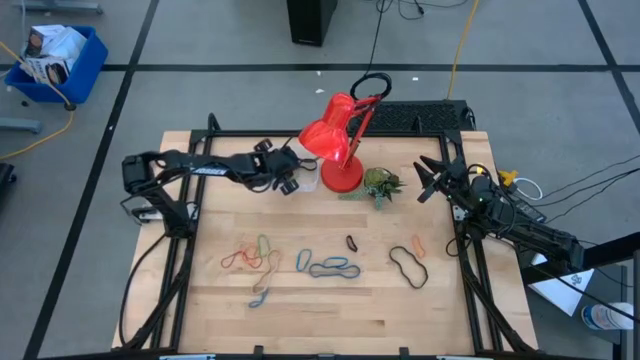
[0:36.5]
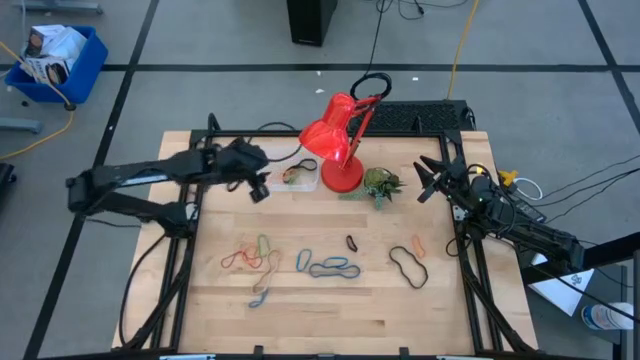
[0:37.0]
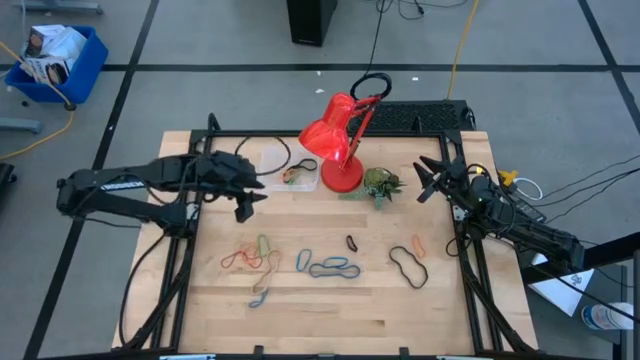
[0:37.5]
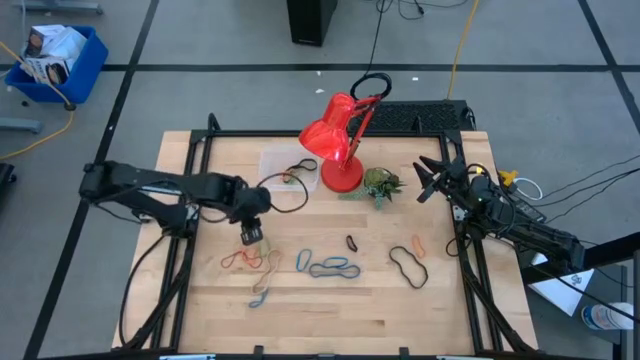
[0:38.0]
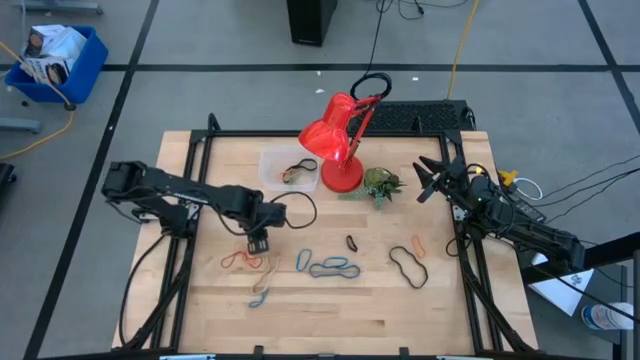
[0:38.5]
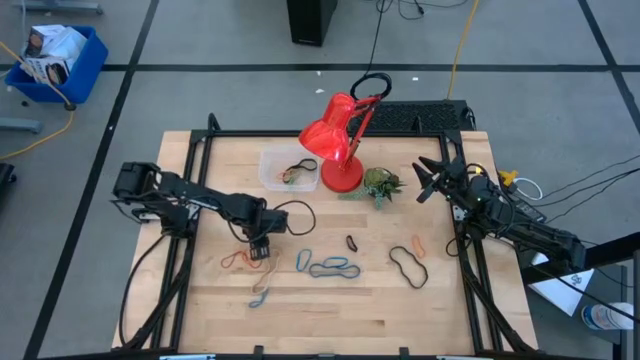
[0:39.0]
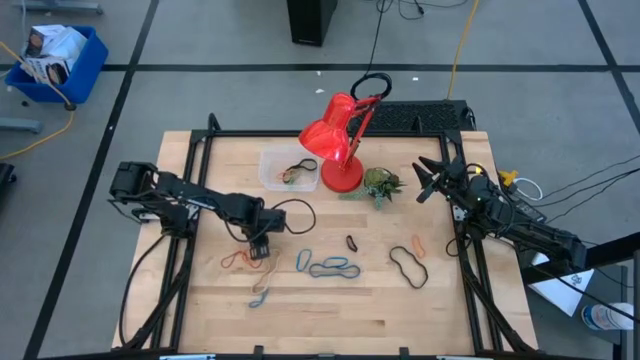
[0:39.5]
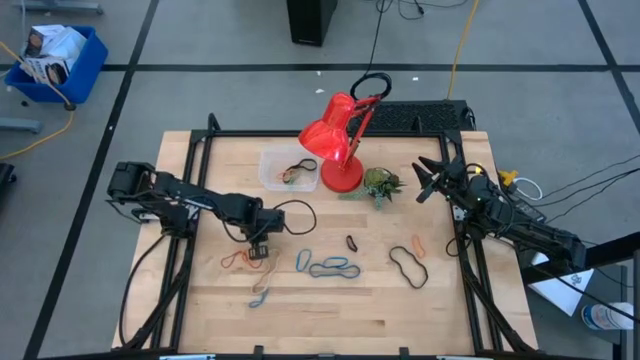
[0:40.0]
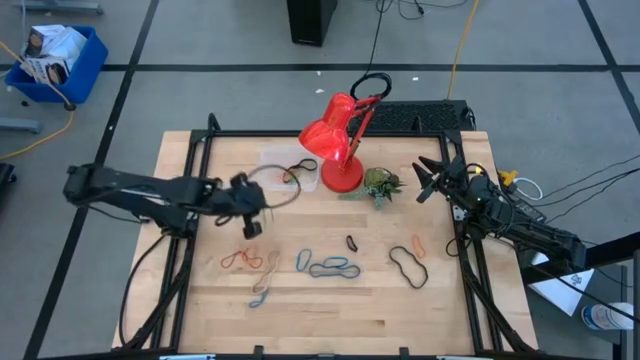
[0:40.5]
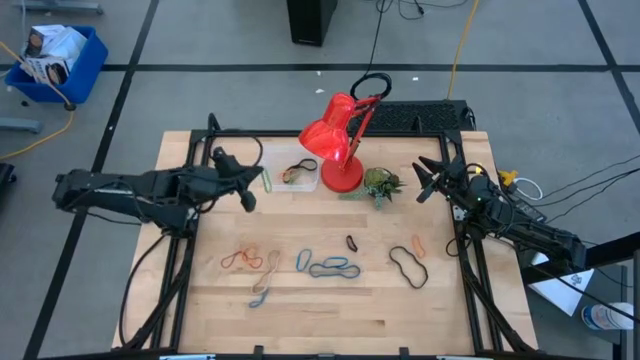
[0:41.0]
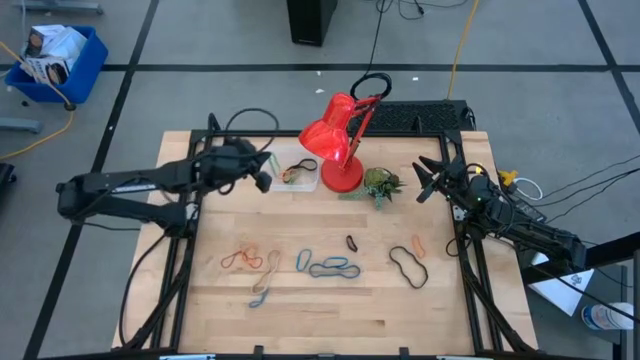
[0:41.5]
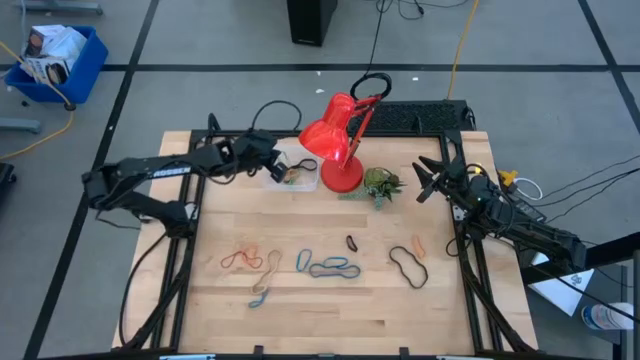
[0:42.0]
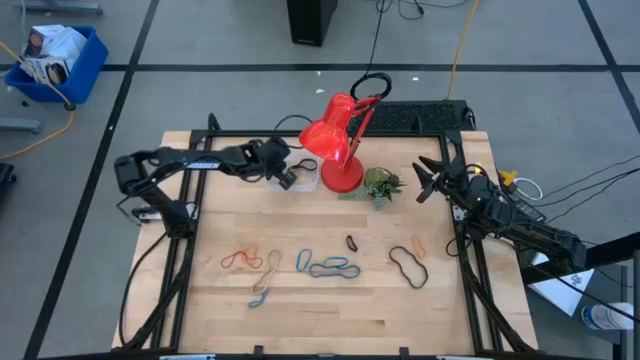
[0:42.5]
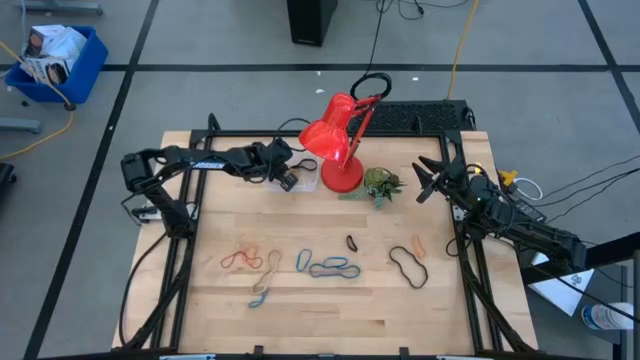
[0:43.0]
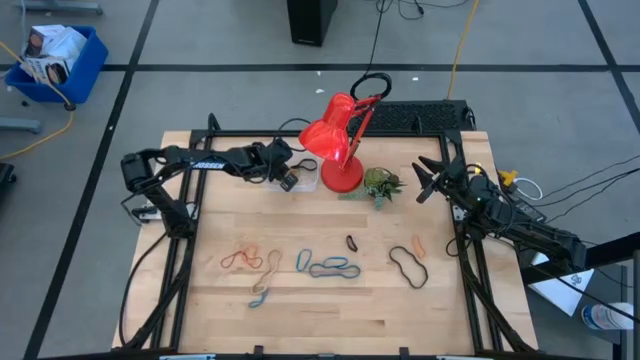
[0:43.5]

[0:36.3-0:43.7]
Task: Pick and place rubber bands into bin
Put the green rubber band into the transparent bin

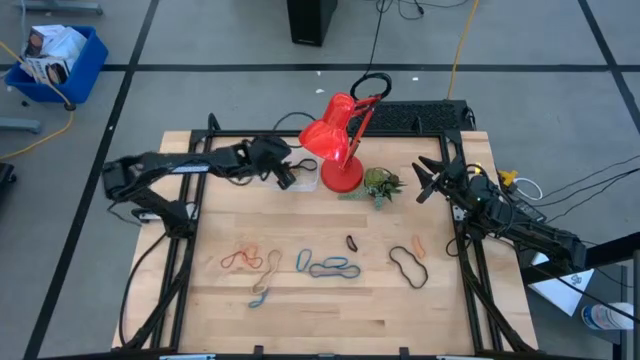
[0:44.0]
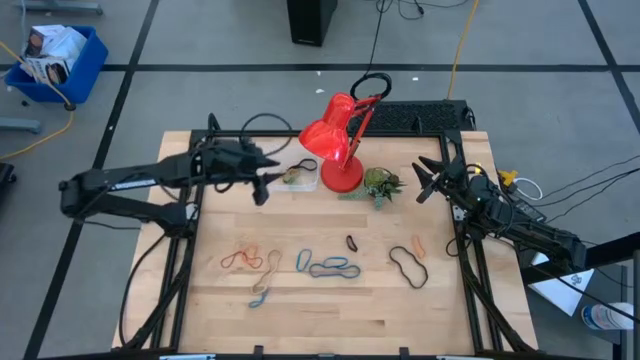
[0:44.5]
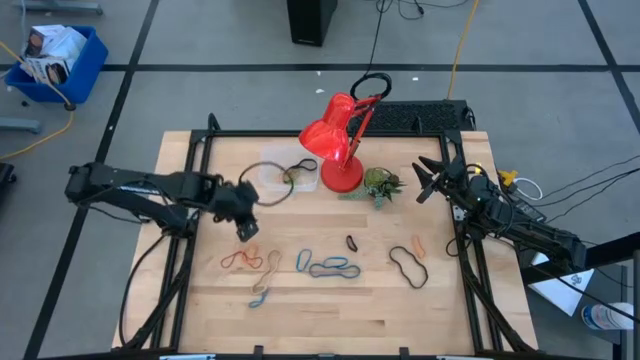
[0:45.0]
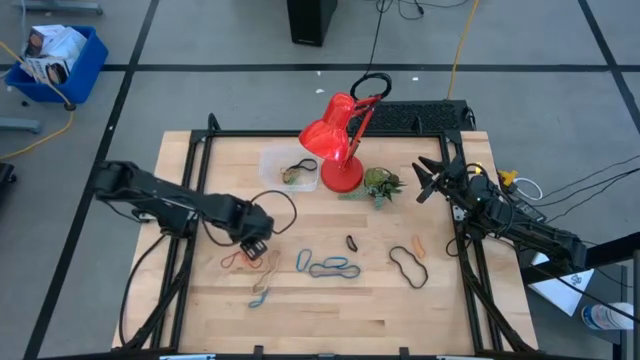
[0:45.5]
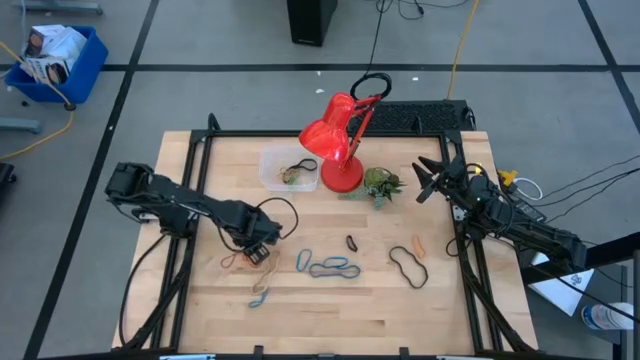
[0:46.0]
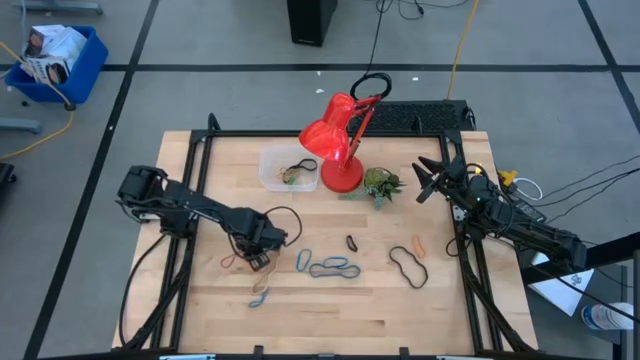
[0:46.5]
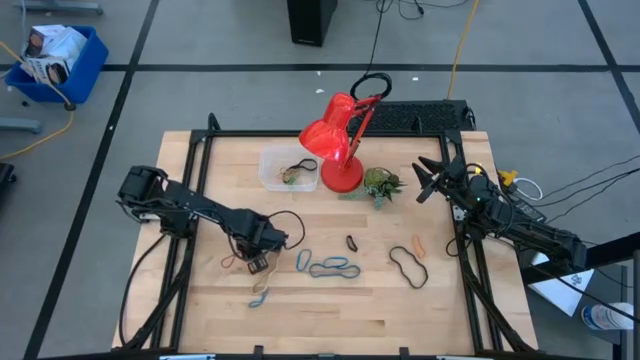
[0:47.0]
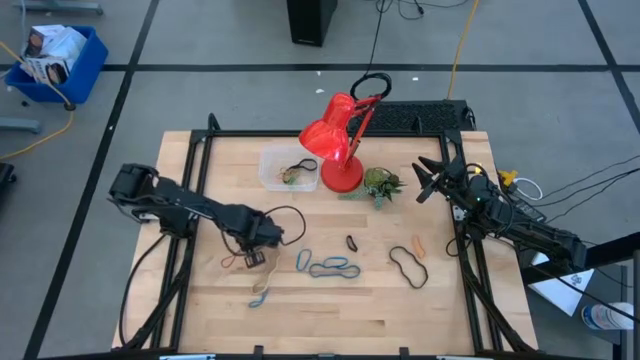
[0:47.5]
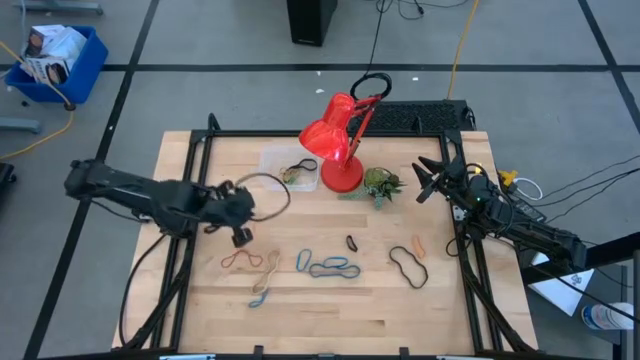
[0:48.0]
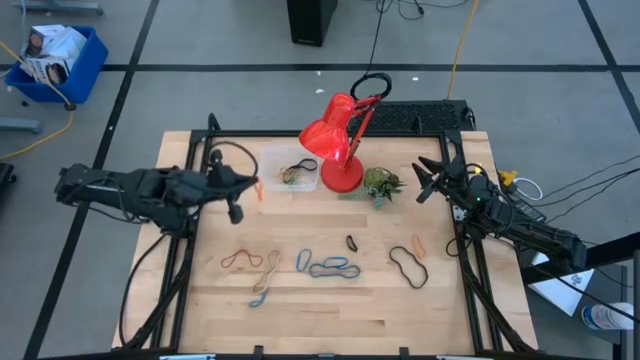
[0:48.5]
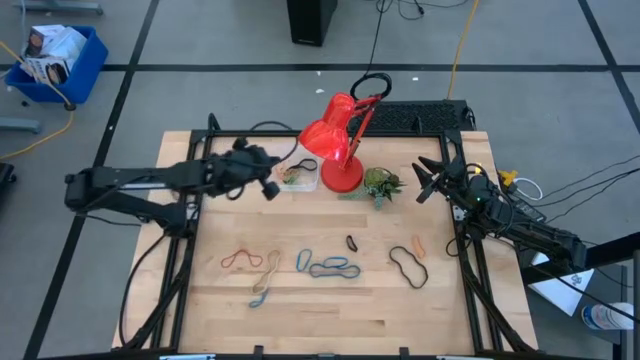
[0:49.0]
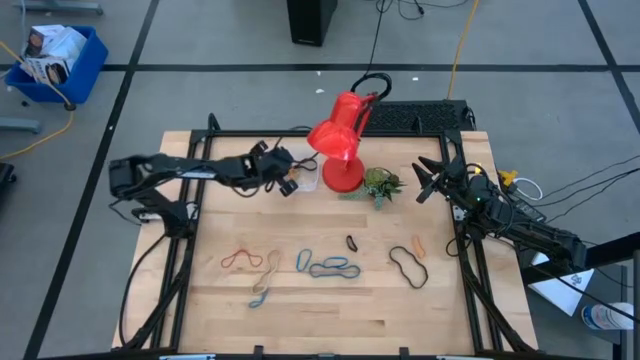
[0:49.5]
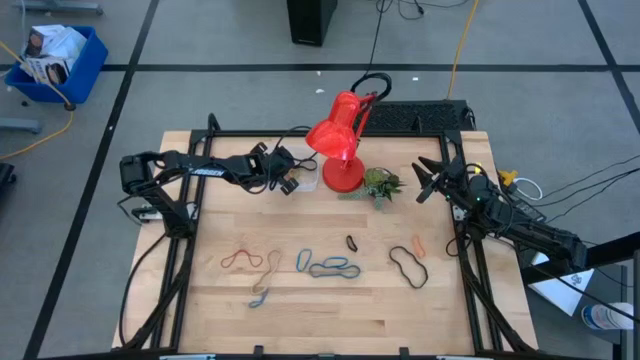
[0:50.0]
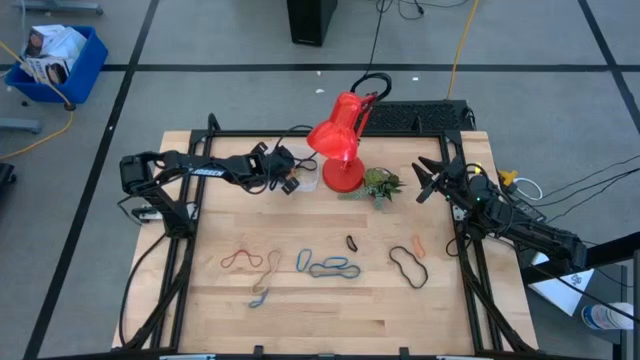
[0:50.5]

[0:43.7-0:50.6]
Put the left orange rubber band into the transparent bin

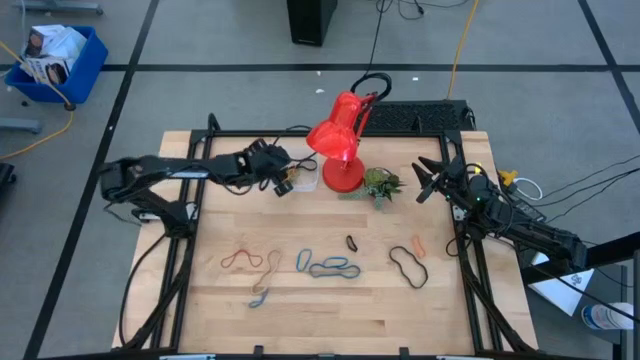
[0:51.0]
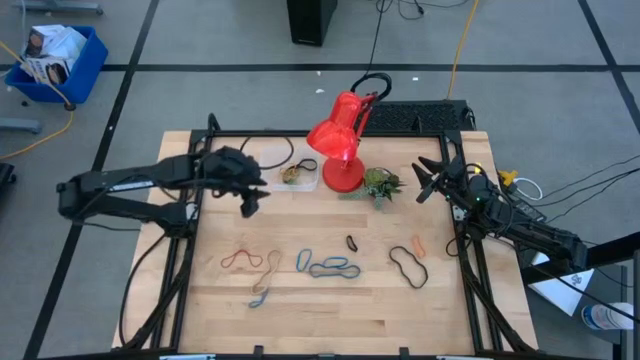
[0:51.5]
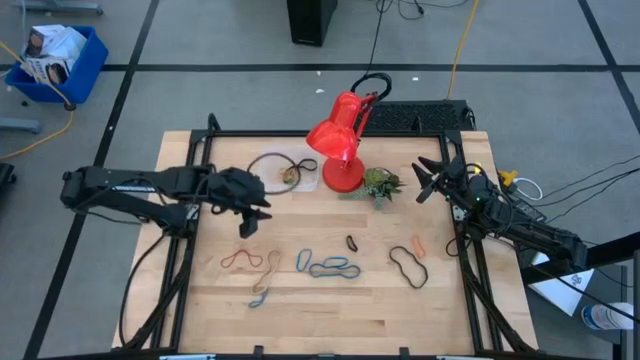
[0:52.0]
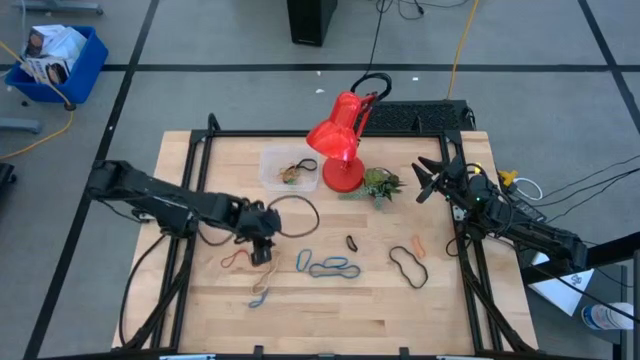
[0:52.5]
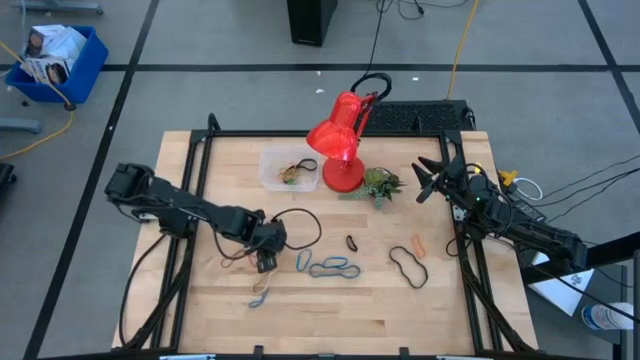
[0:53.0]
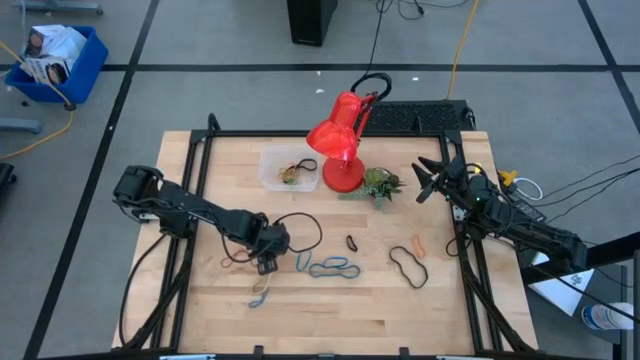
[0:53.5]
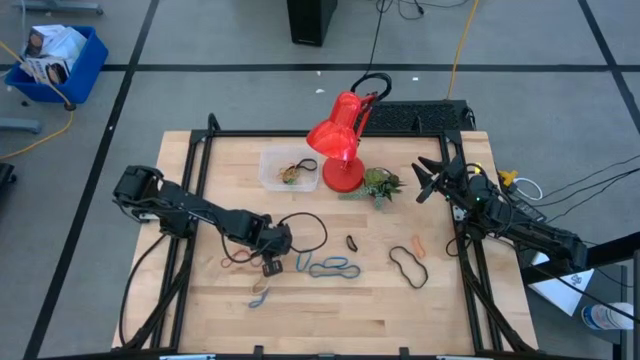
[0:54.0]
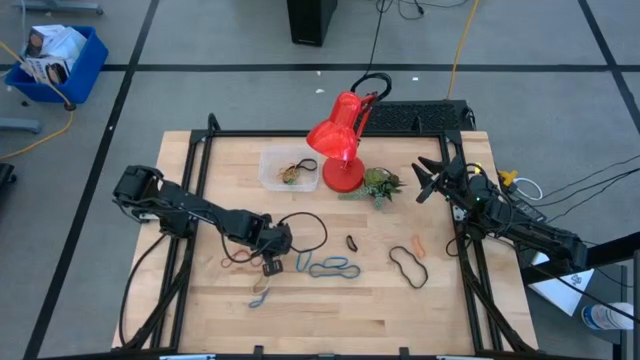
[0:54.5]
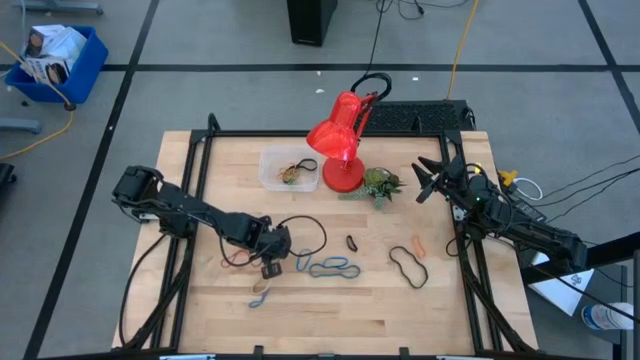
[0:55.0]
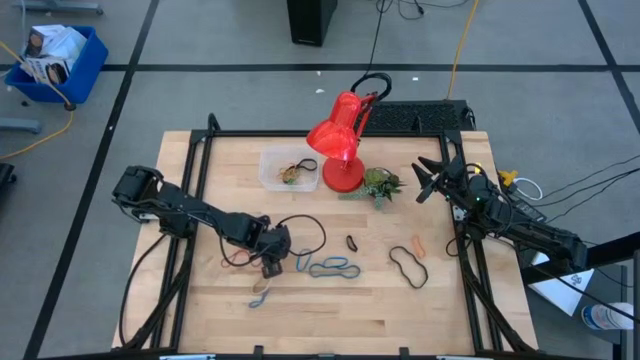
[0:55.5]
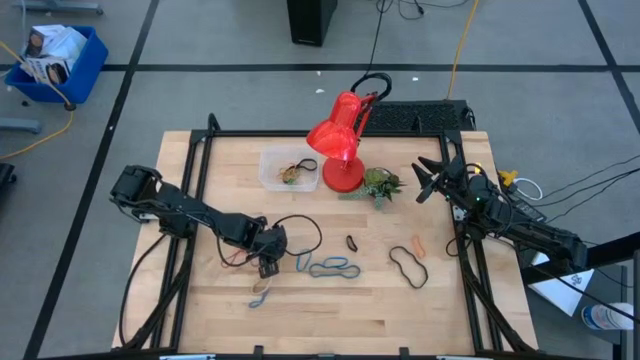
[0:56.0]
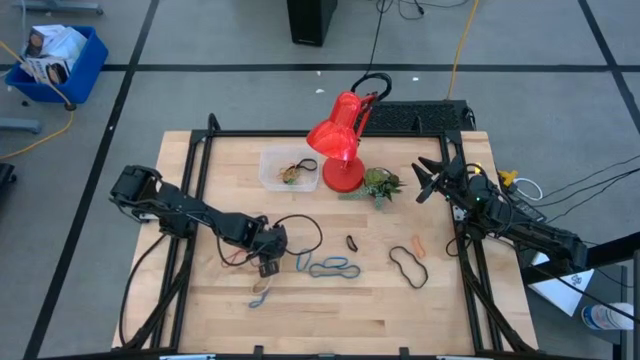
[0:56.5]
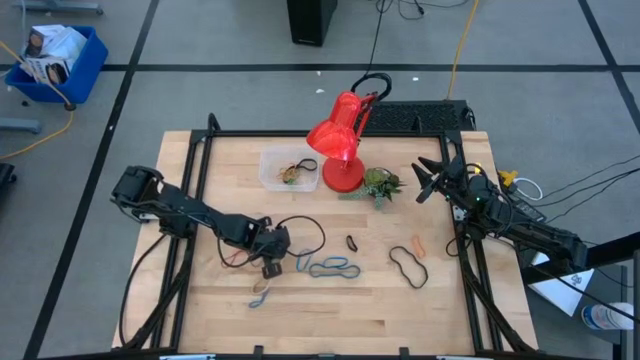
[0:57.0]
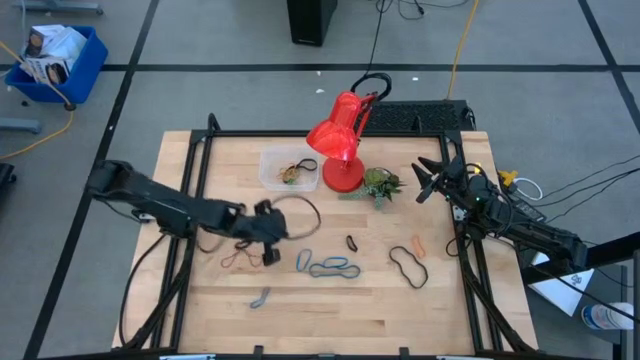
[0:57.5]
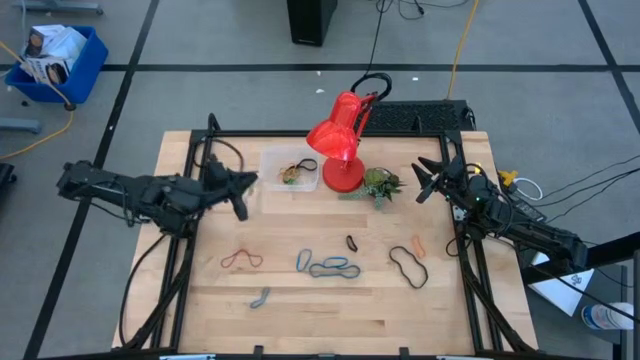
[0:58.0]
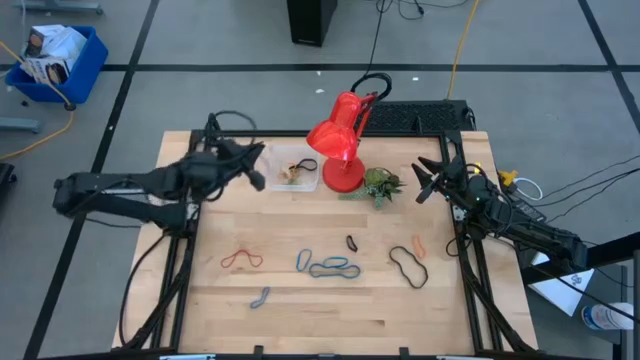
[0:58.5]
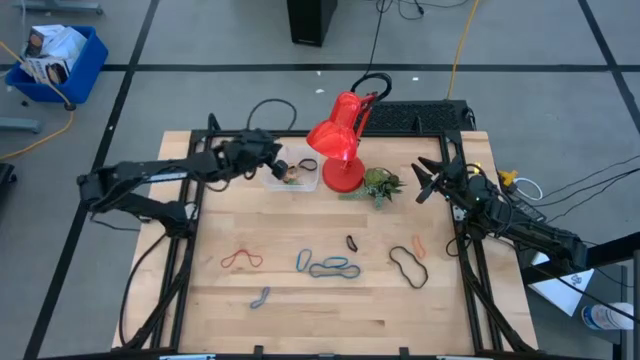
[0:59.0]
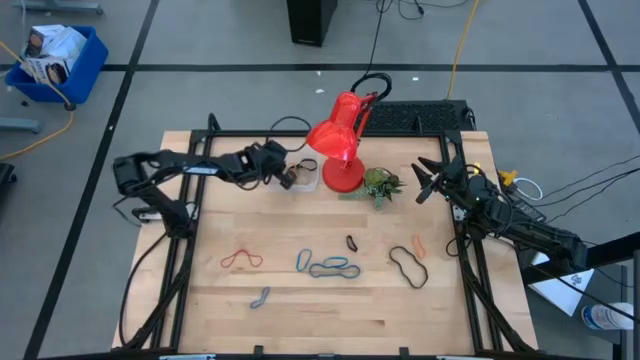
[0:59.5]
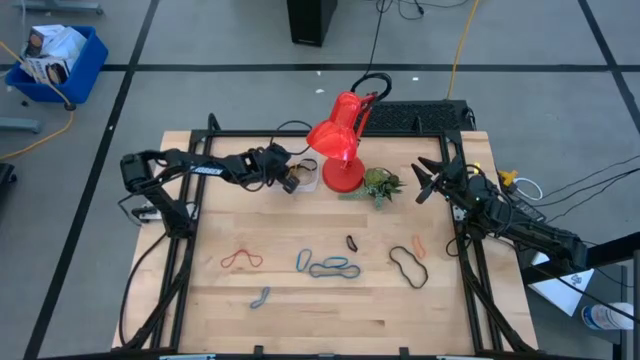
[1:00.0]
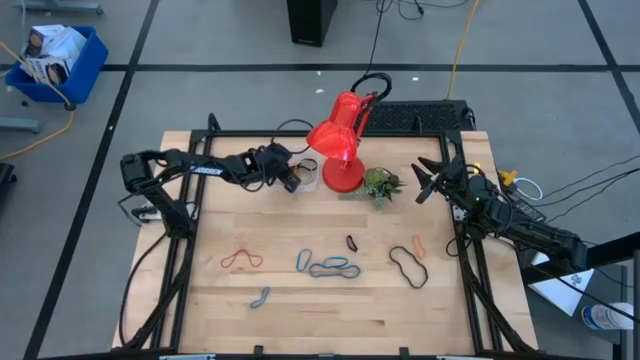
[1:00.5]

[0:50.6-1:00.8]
Put the brown rubber band into the transparent bin
